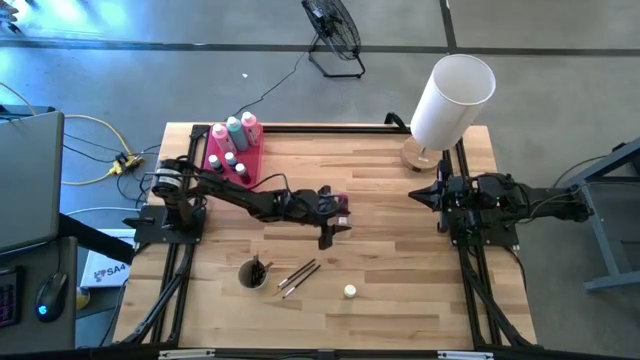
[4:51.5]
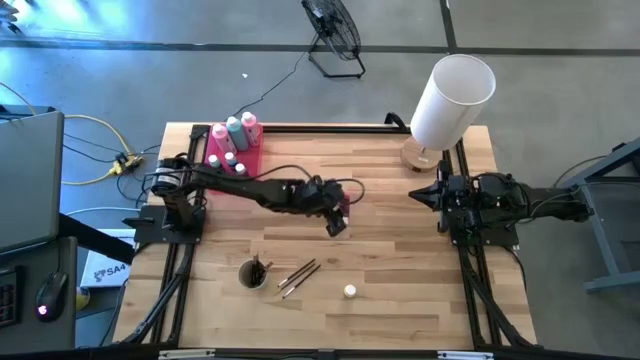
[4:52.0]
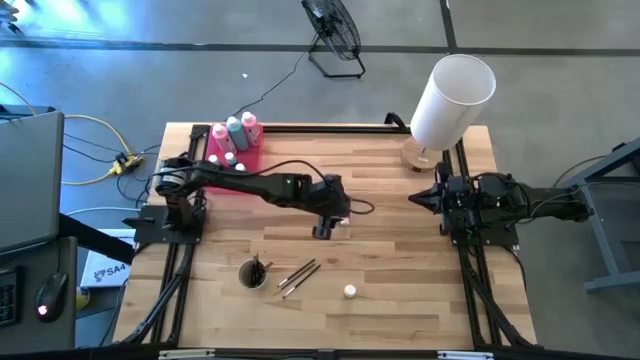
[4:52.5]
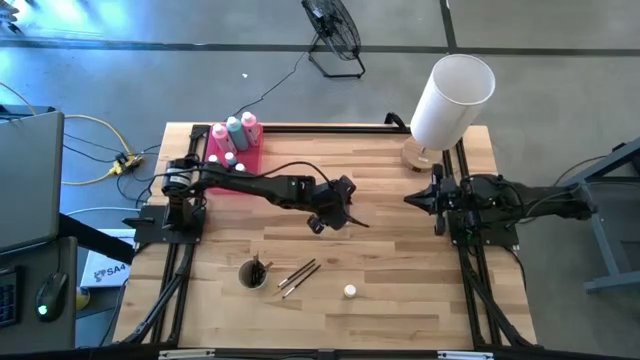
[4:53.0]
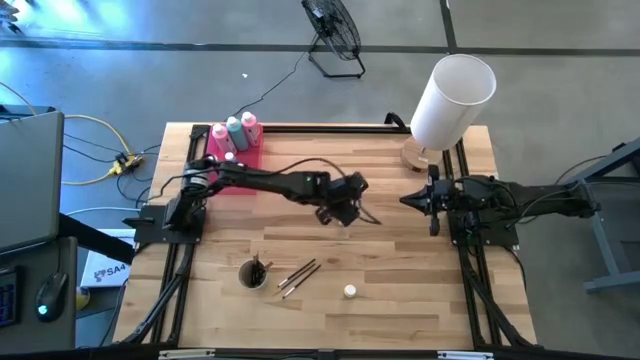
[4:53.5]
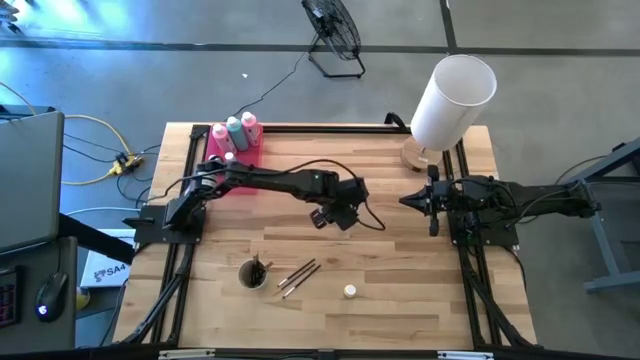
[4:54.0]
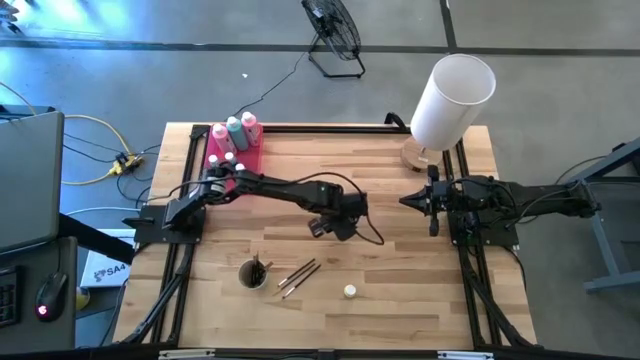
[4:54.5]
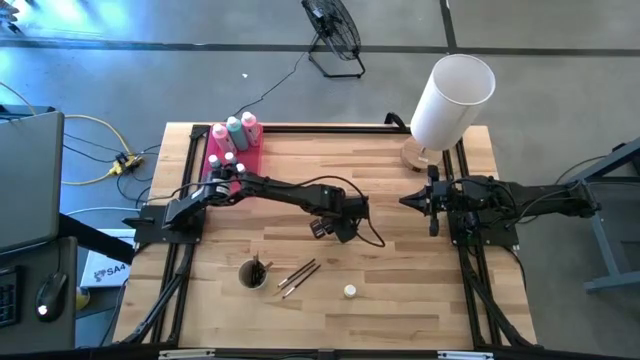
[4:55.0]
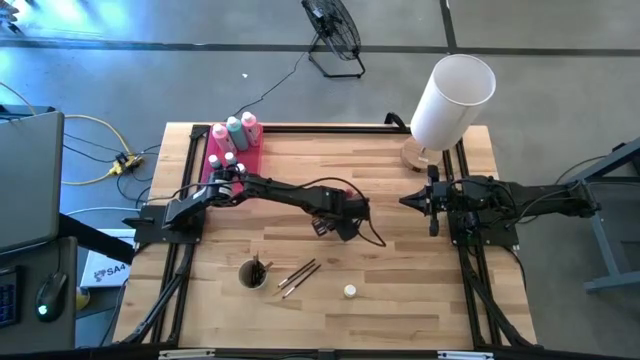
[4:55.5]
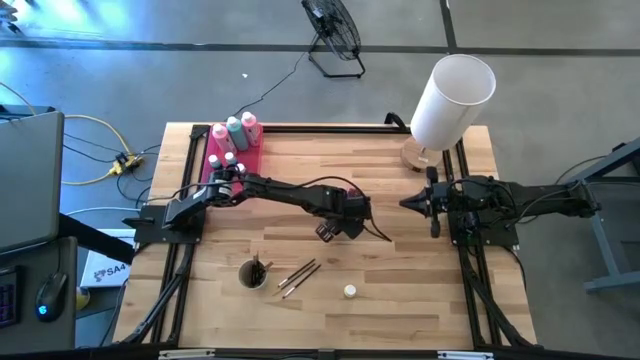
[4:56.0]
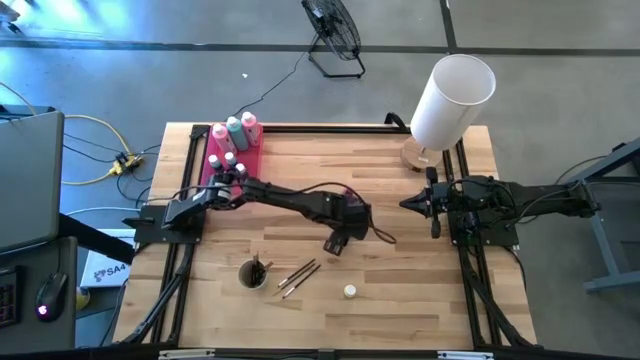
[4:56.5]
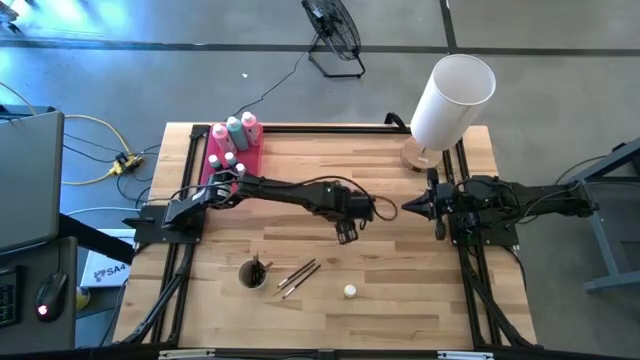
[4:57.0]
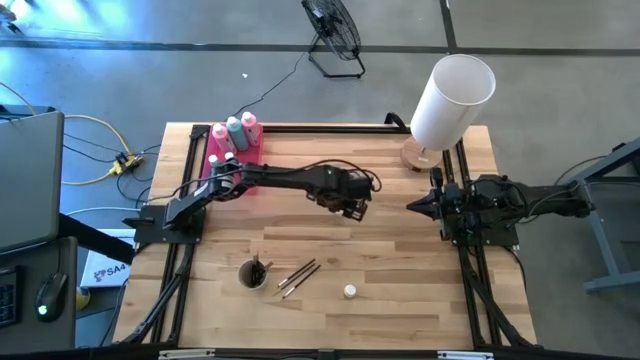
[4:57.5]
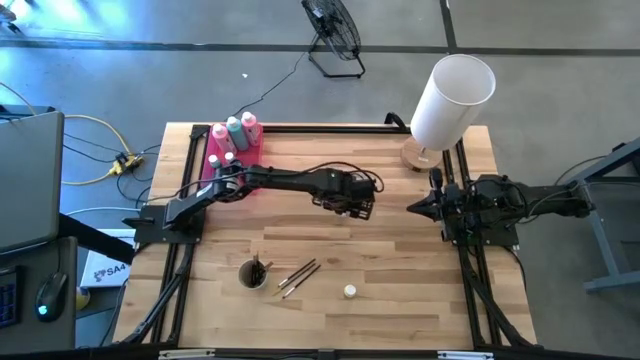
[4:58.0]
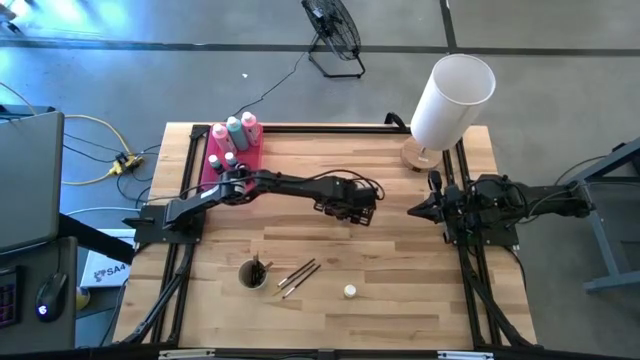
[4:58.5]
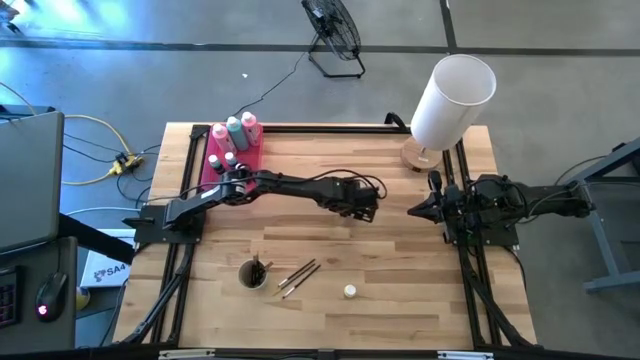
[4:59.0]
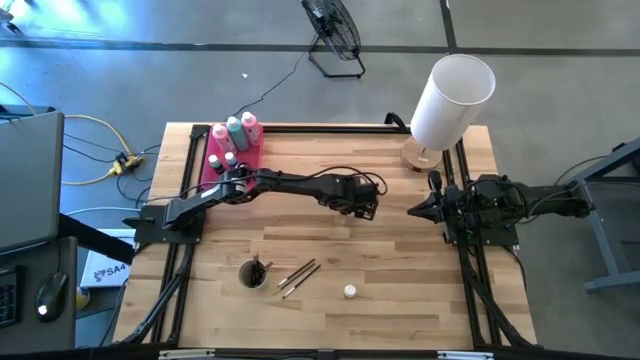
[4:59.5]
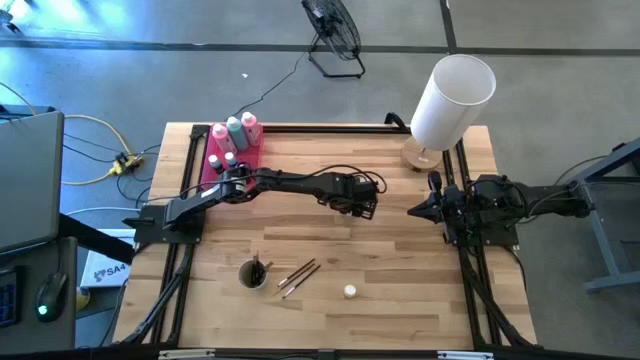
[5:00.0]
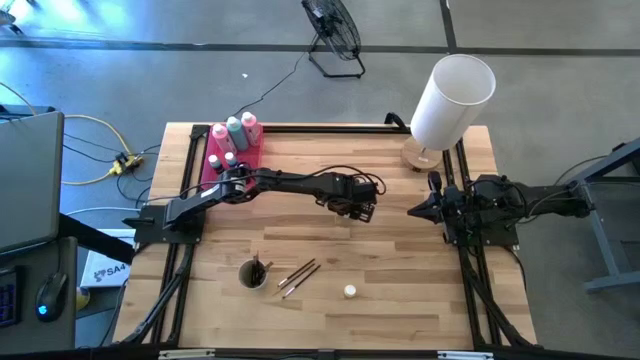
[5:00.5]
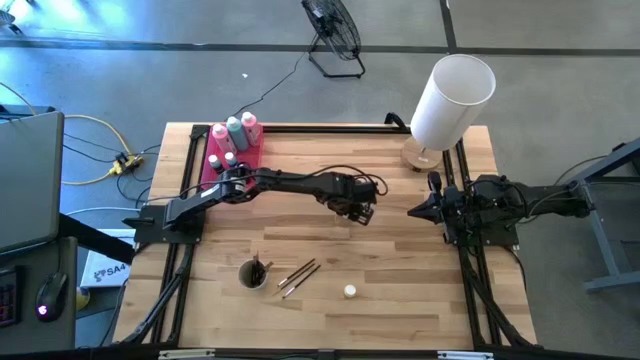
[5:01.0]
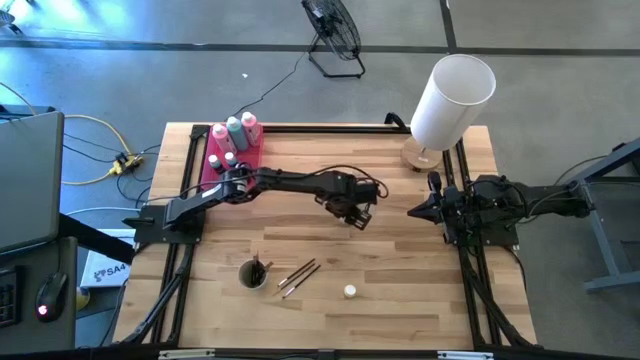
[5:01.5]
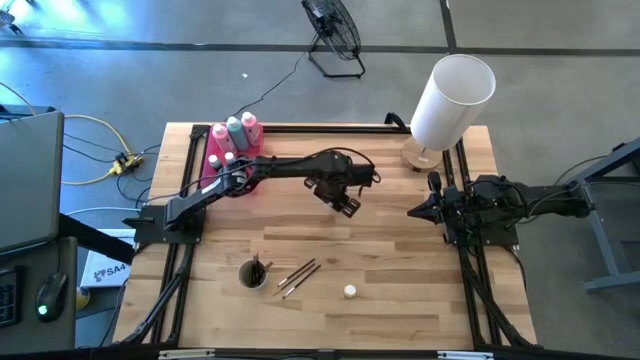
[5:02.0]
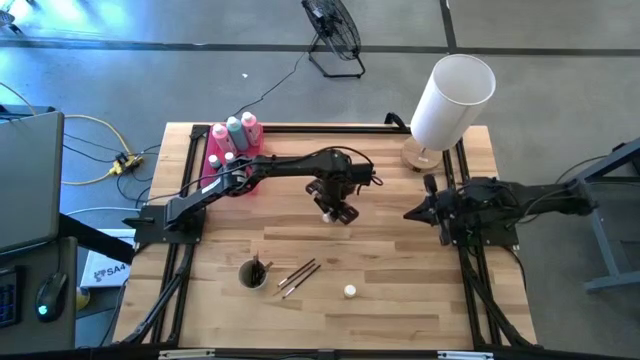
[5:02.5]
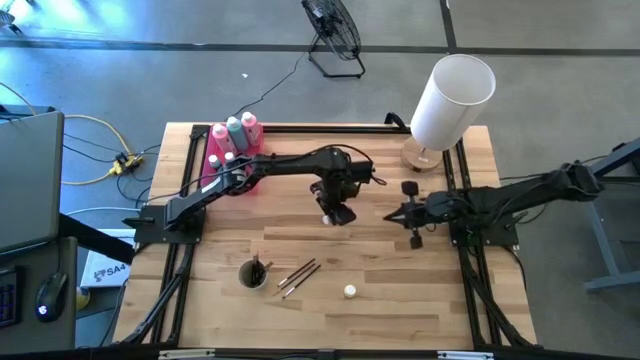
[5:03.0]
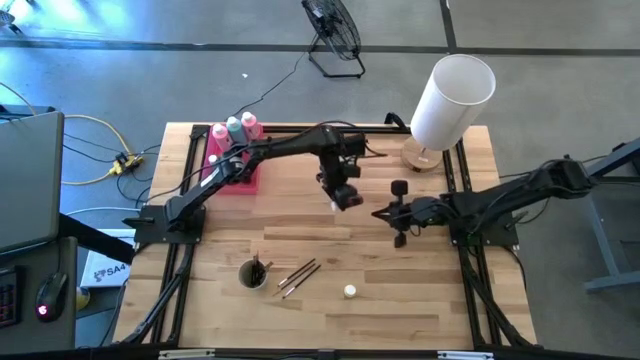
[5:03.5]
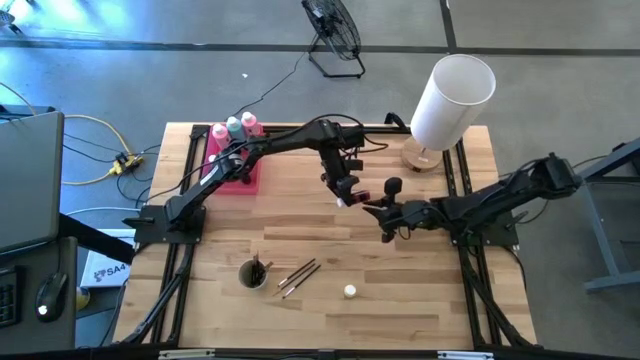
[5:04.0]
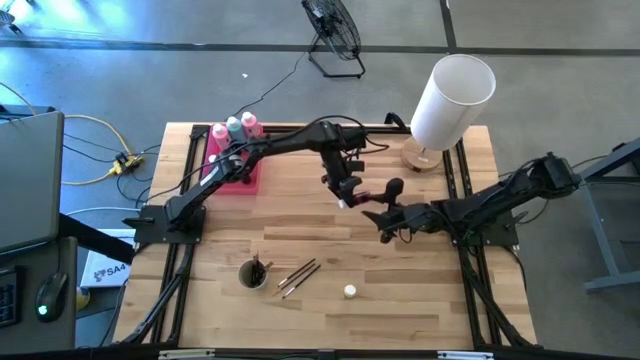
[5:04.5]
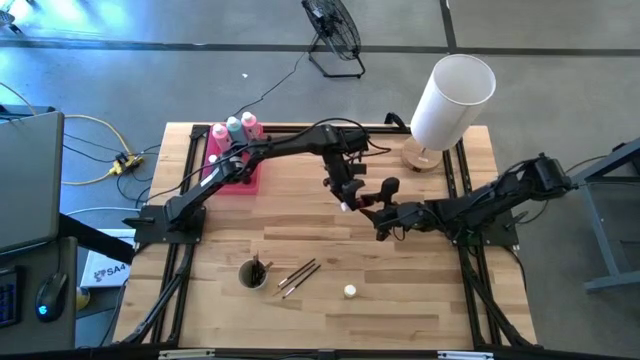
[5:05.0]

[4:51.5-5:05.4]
Task: Pick & Place Paint Supplies
Put the small pink paint bottle into the pink bin
